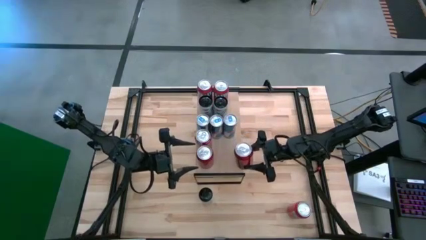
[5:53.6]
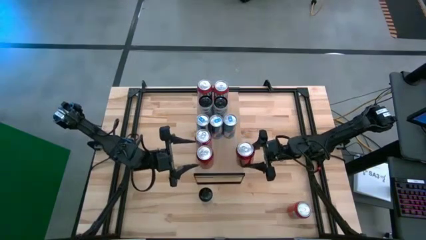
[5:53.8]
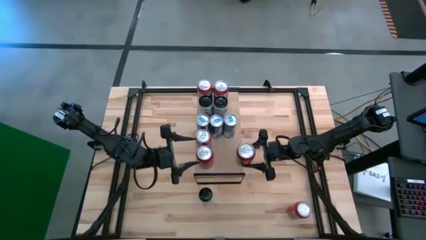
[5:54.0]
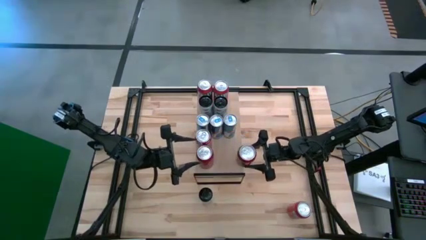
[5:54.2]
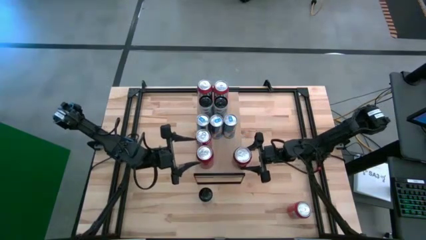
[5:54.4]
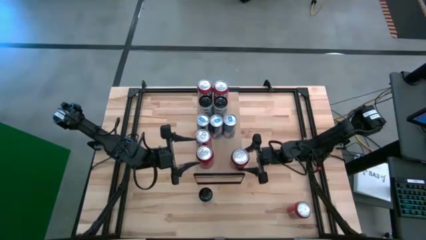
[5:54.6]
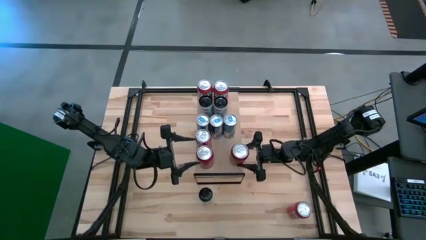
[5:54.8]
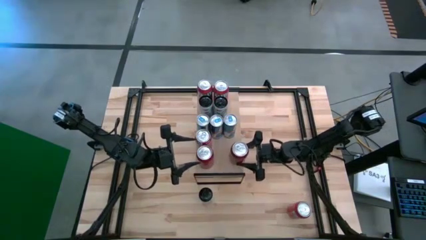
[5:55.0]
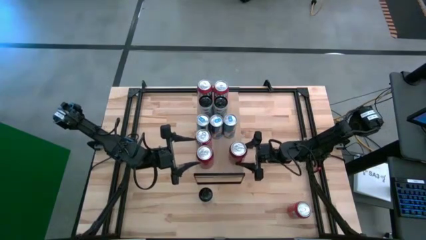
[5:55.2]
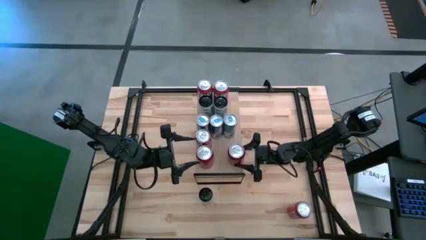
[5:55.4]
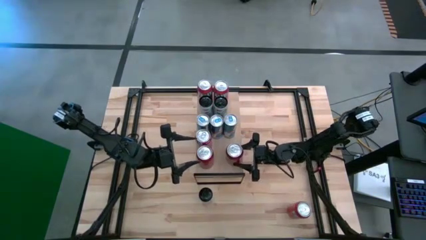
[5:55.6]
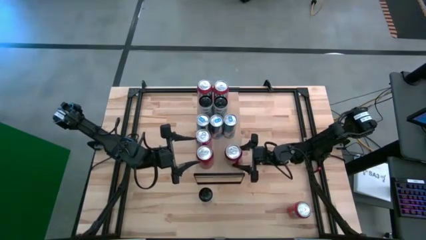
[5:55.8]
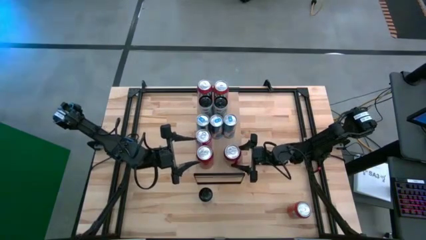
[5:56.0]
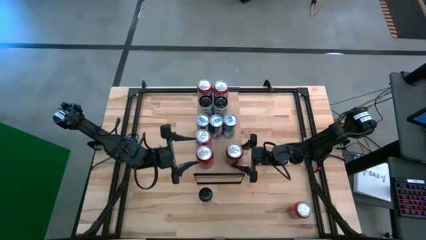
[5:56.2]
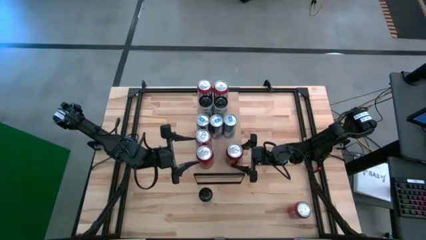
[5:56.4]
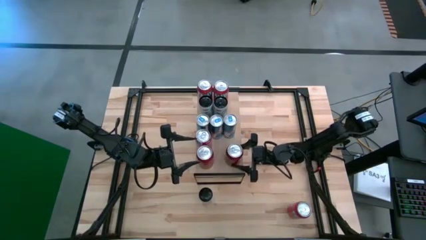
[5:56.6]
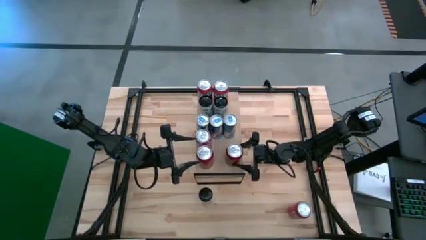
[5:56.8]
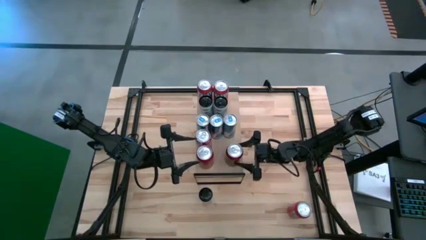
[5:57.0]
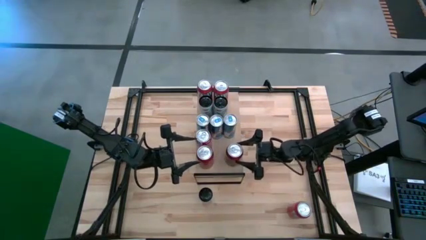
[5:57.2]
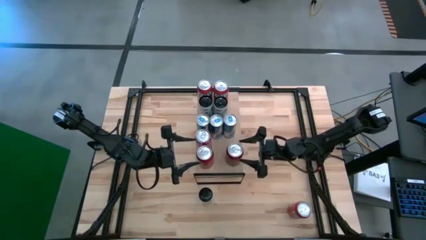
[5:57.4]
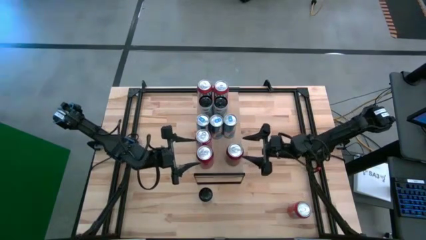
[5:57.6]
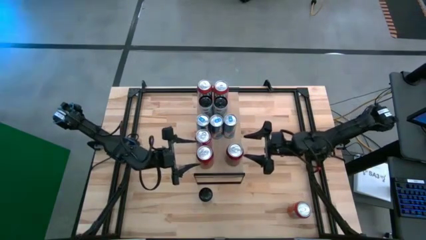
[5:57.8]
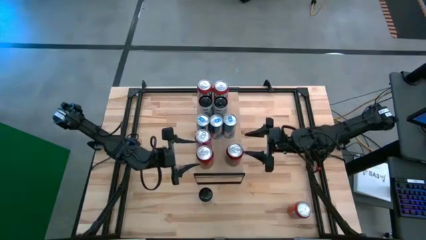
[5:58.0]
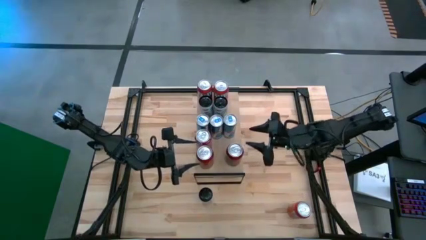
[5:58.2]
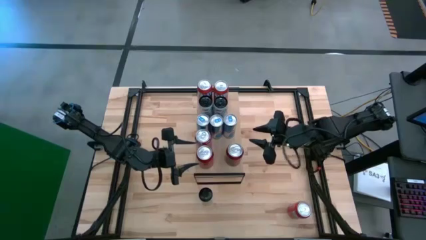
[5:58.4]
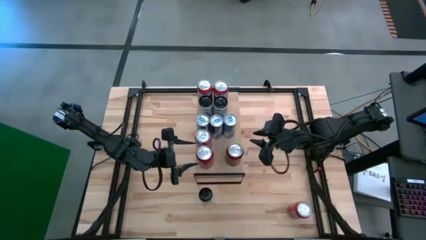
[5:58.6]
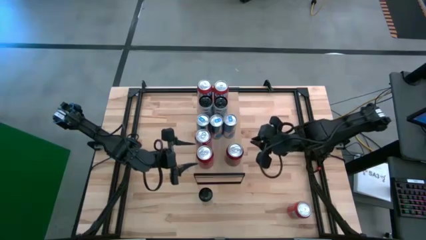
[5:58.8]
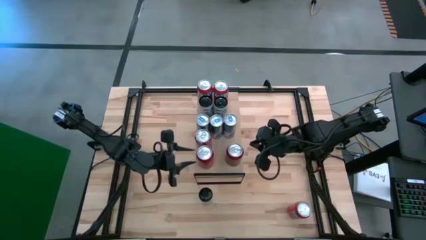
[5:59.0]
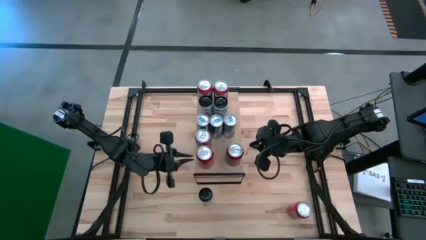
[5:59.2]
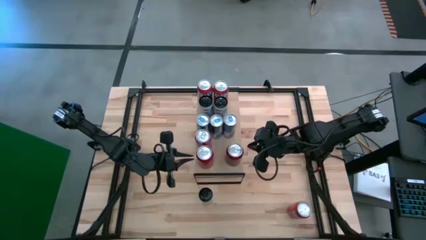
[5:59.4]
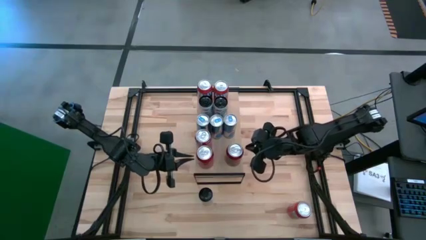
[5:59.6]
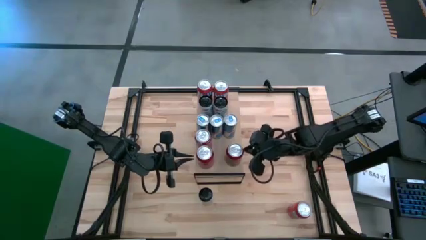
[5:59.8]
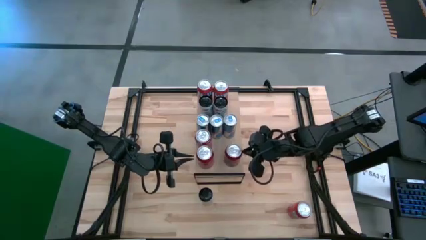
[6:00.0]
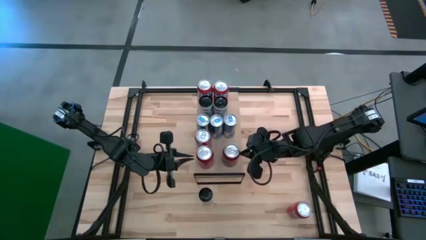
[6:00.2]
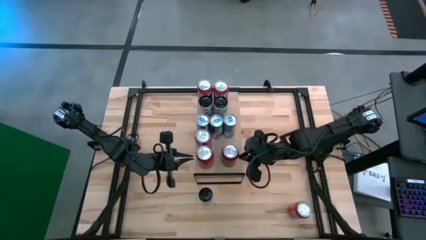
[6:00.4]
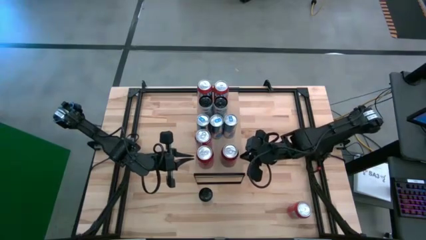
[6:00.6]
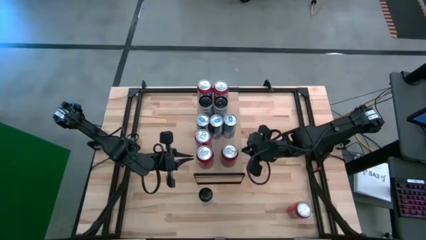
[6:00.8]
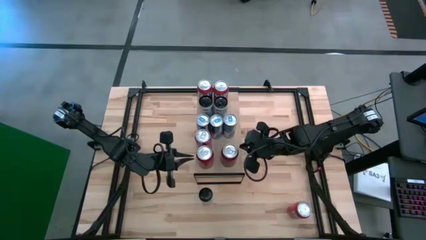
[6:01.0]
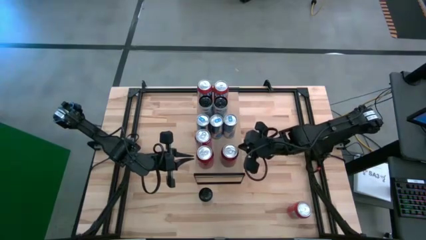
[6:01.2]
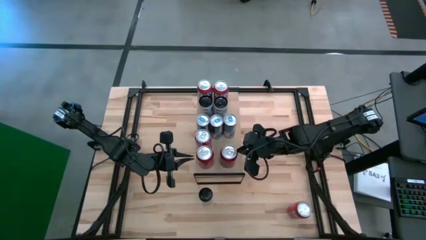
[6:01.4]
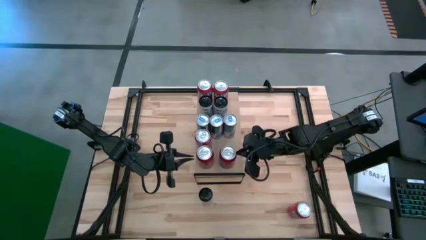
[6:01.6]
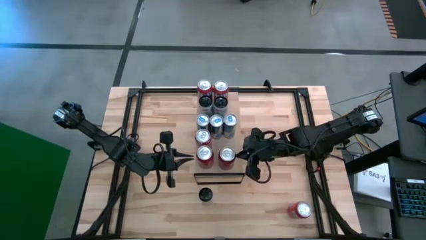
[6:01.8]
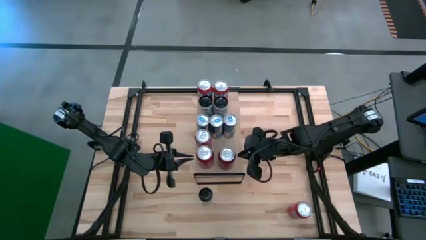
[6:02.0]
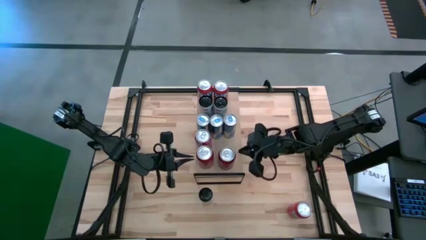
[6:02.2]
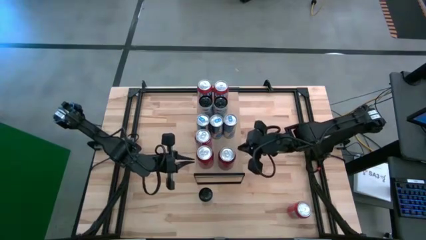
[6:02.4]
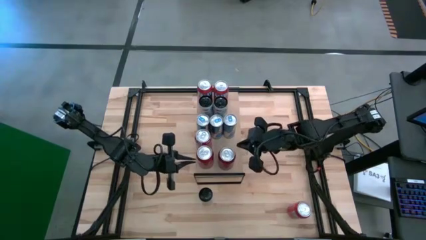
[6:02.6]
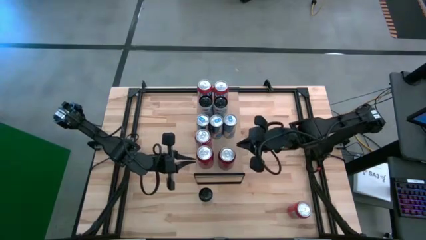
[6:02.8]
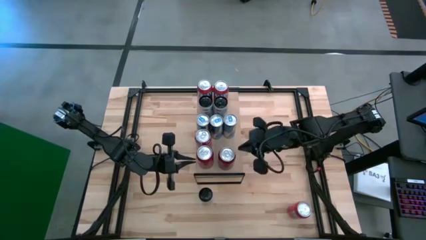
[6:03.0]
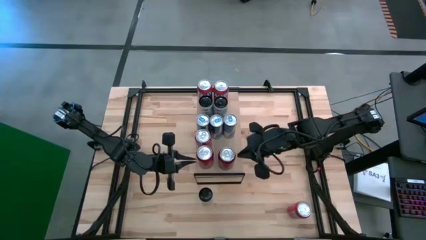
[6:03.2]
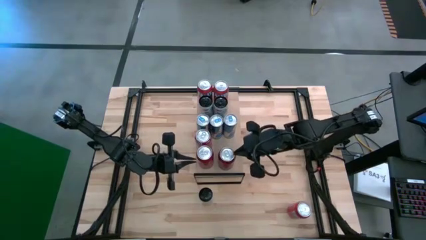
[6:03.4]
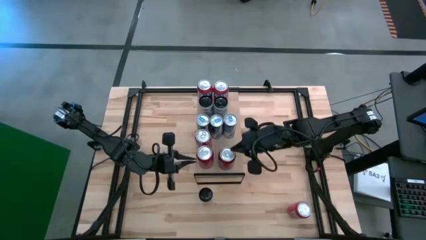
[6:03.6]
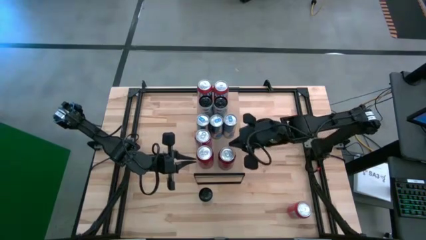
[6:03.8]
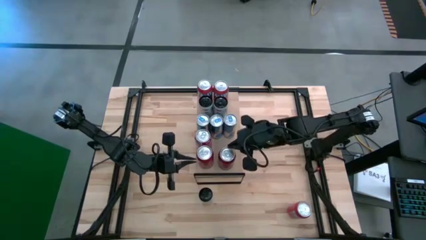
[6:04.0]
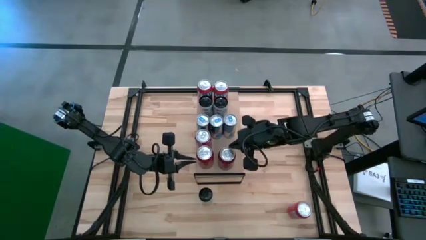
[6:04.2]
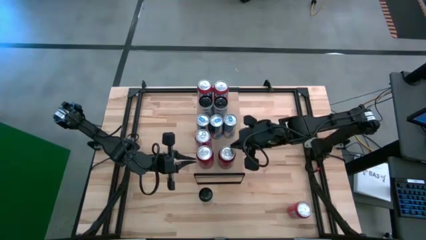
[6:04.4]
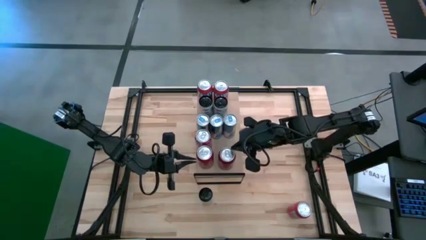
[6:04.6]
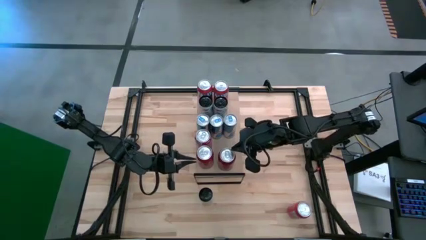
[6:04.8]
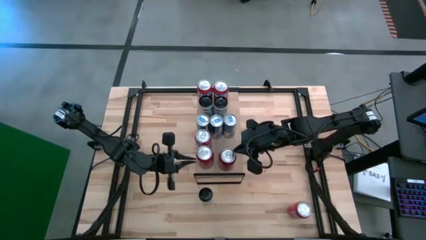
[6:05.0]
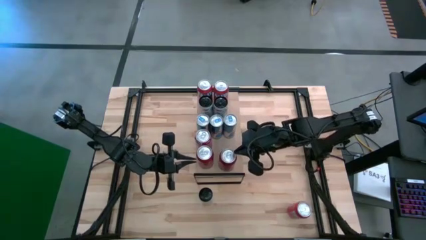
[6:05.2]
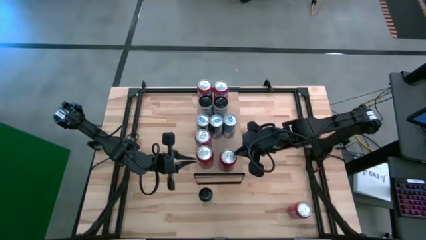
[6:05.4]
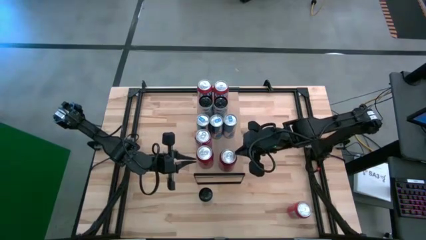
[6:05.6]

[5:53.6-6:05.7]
Task: Place canned beverage on shelf
Put the red black soda can on the shelf aligned with the other red black soda can
